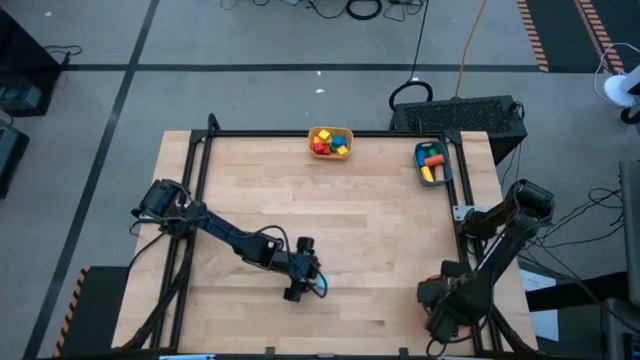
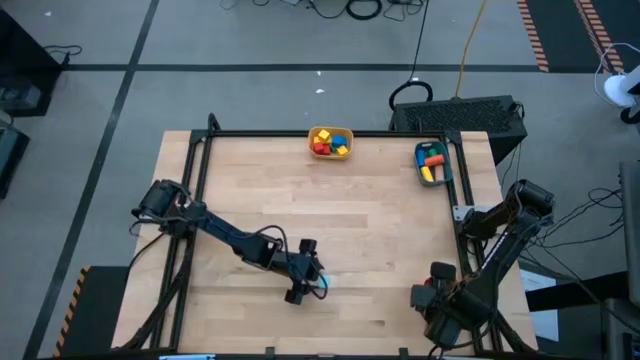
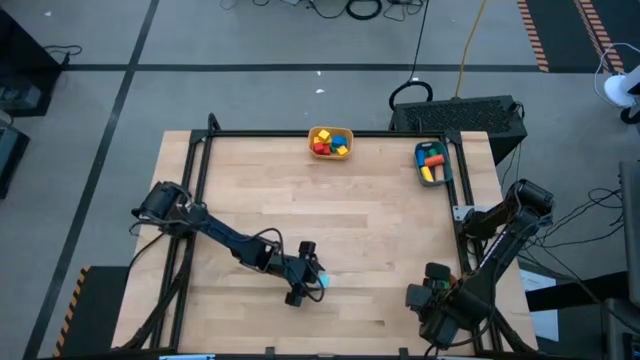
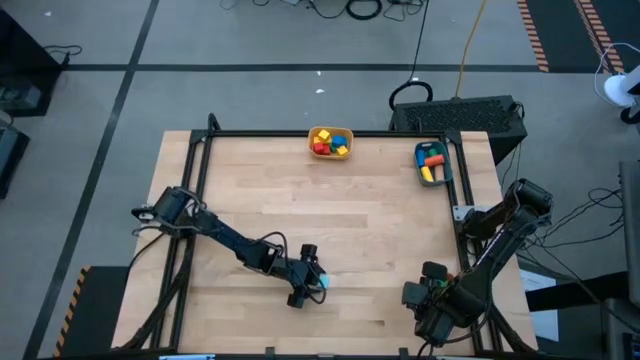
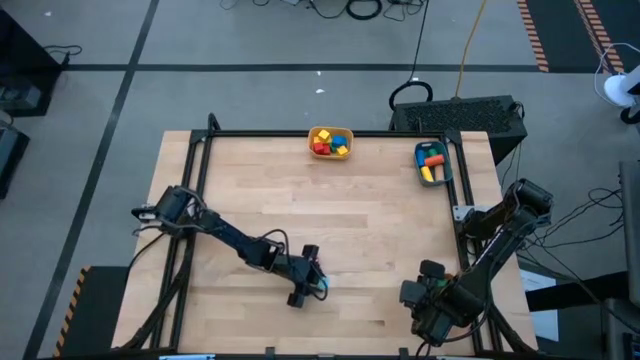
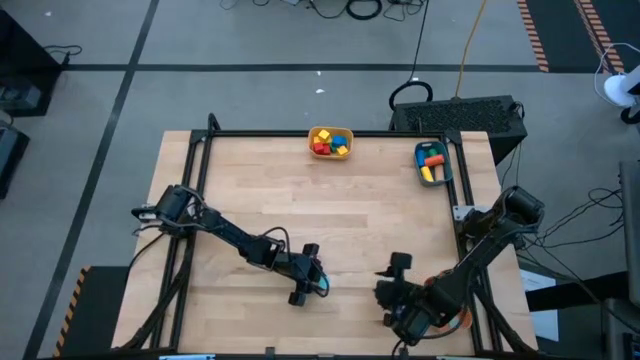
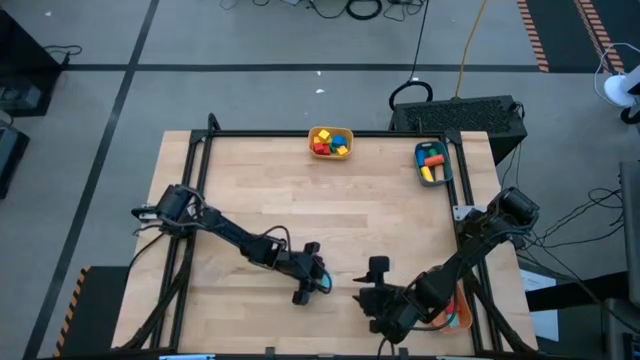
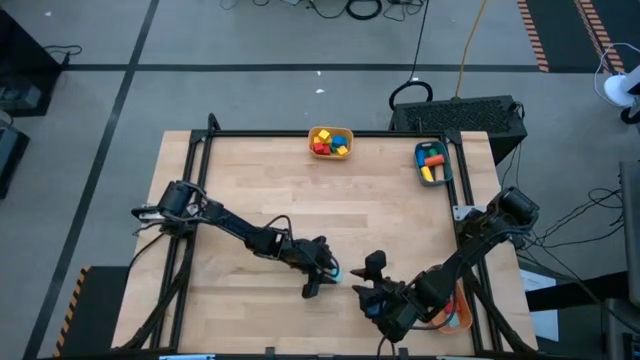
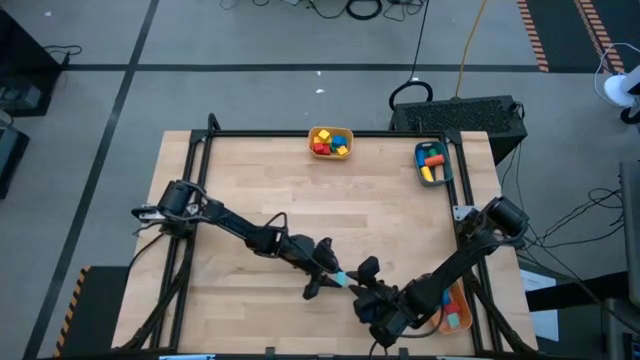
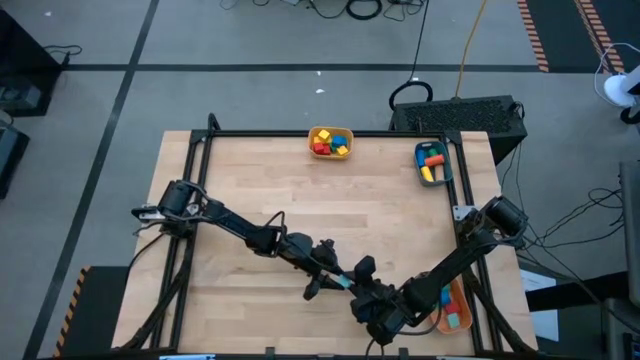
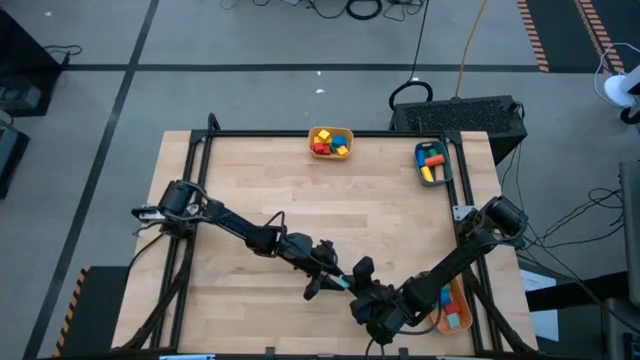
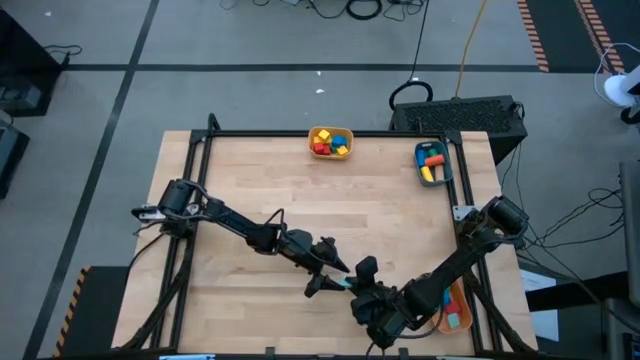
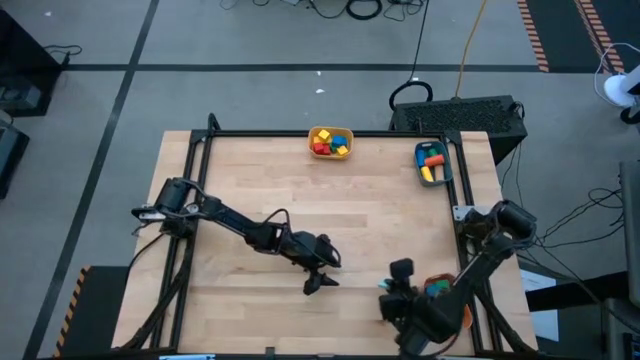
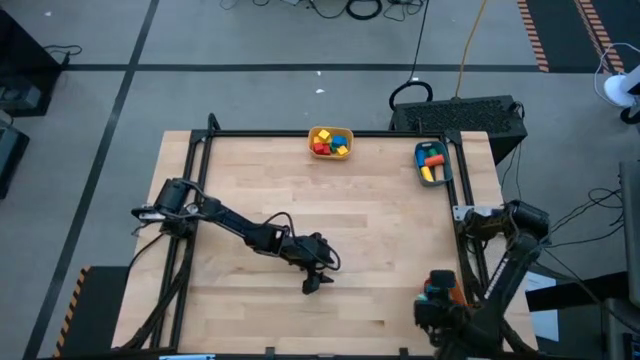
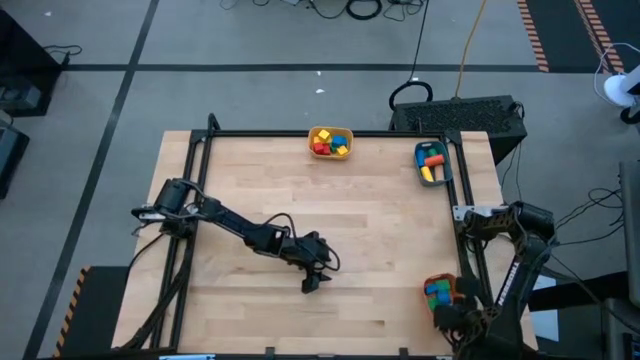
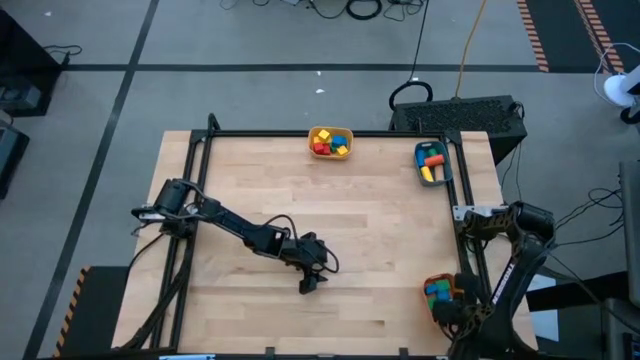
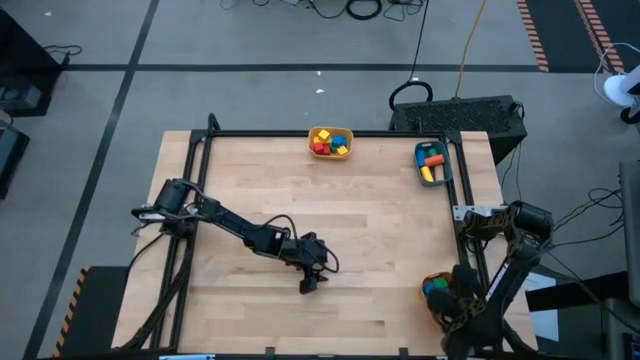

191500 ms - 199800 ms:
Task: Sort blocks by size
Put the light blue half circle blue block into the orange bin

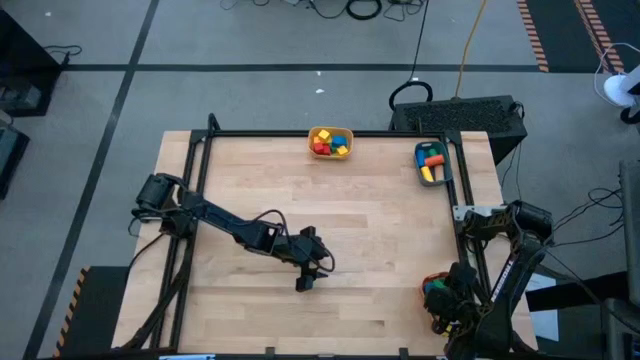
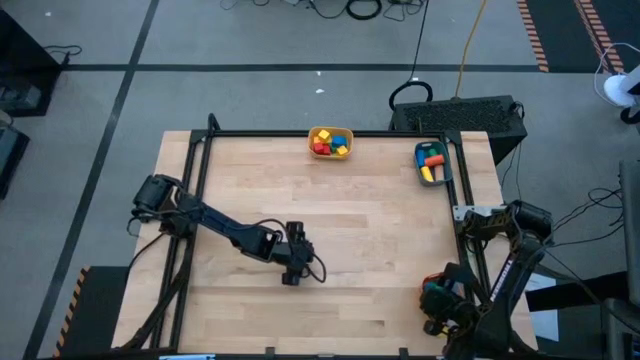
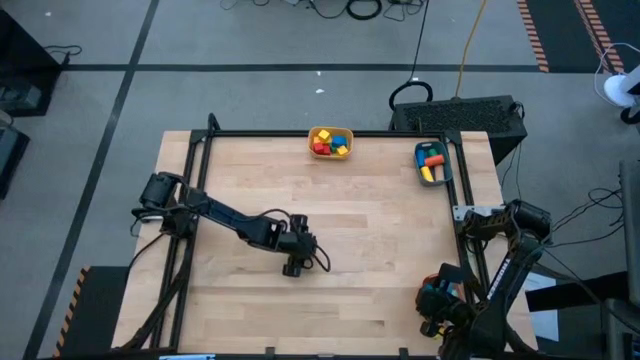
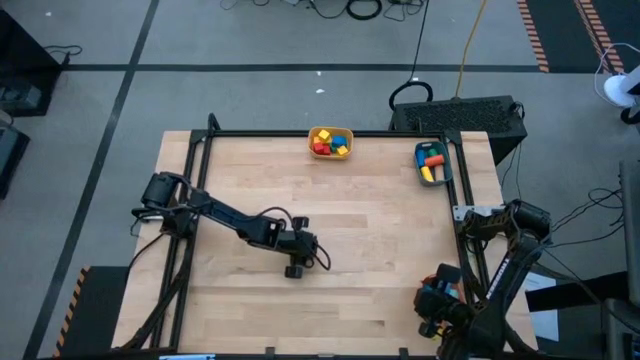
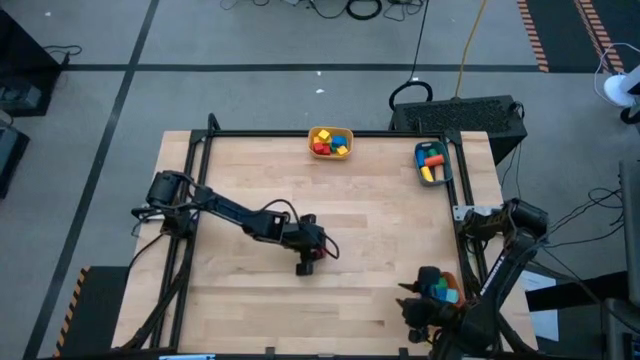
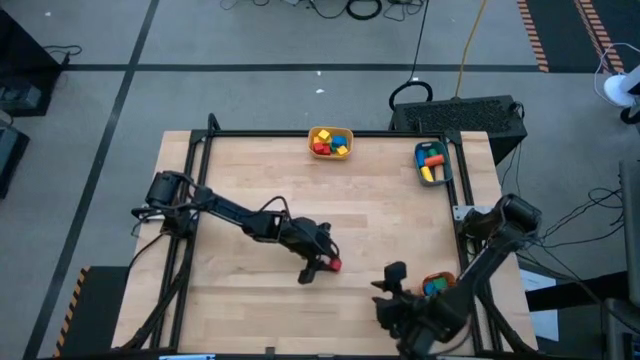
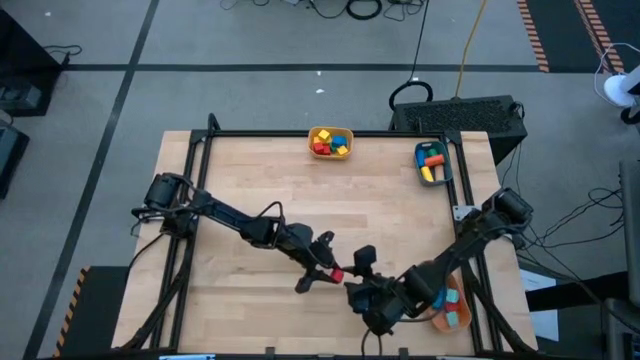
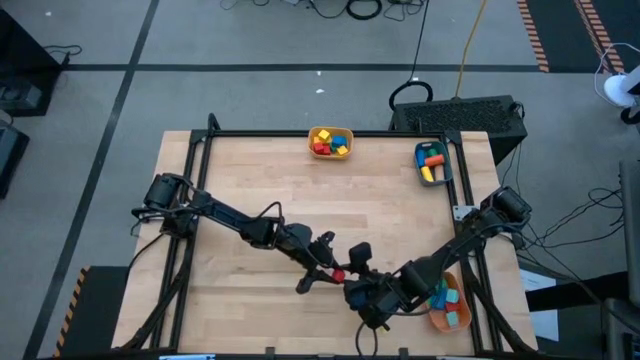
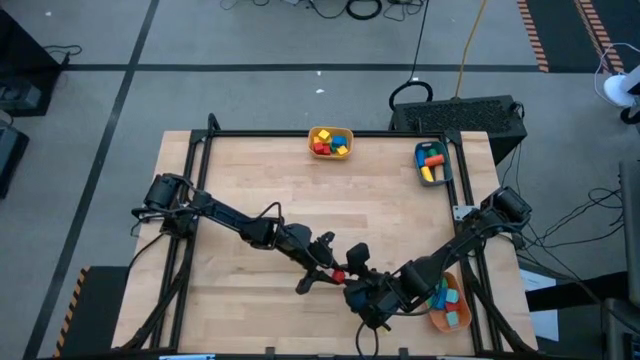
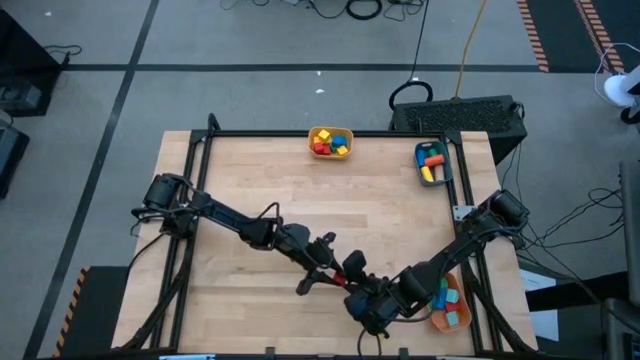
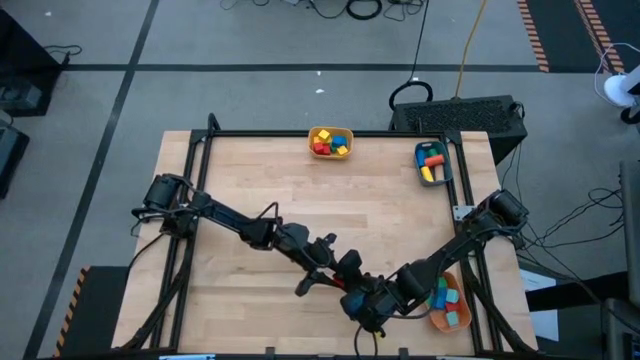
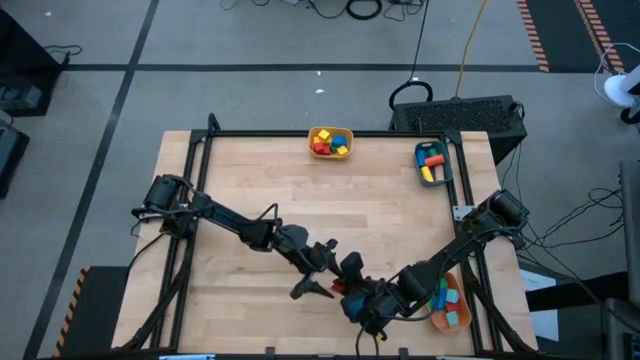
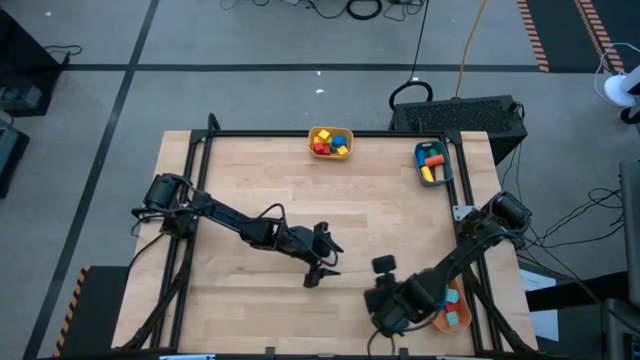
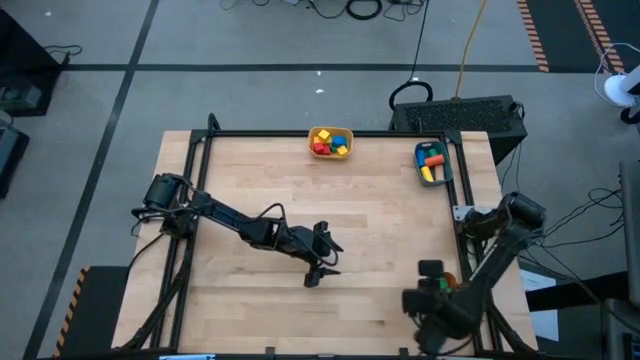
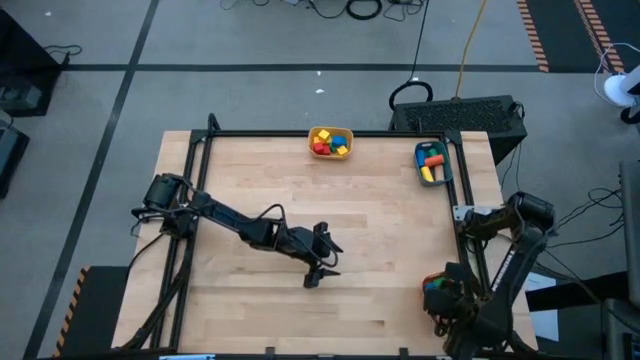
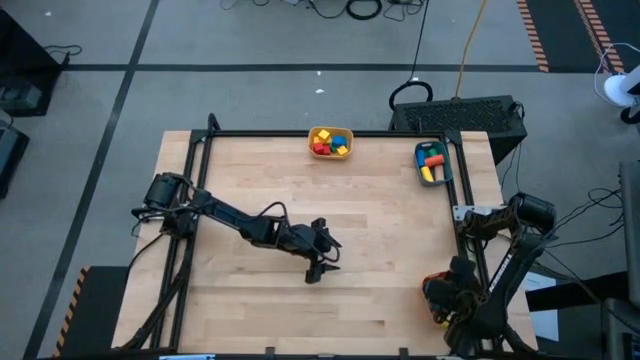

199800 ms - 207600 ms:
Put the red half circle block into the orange bin

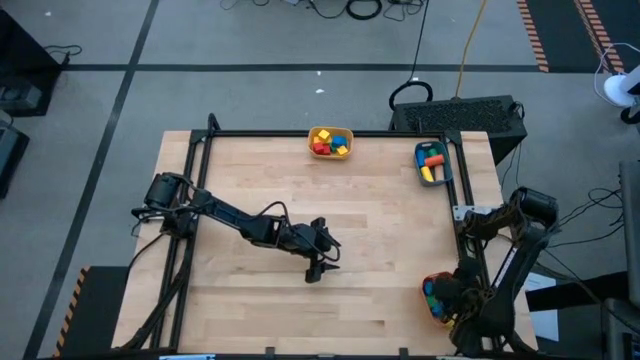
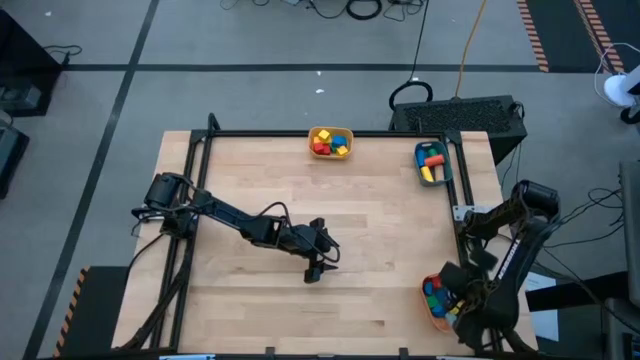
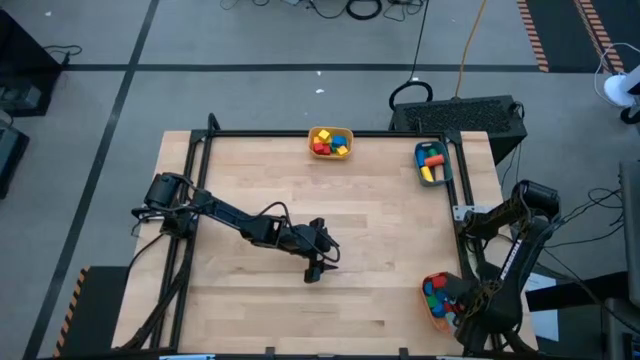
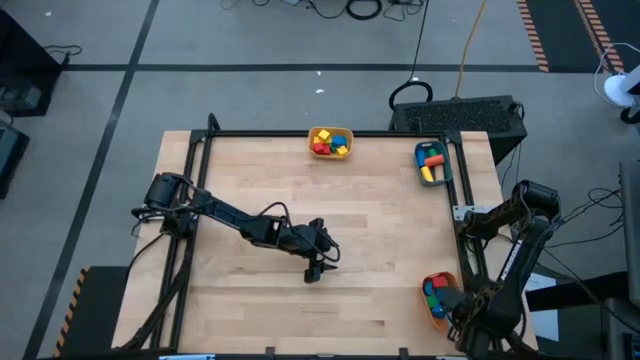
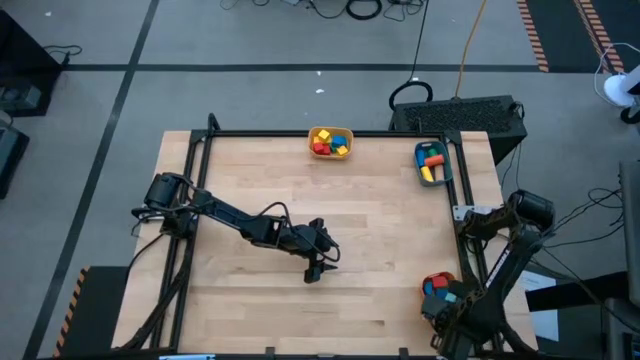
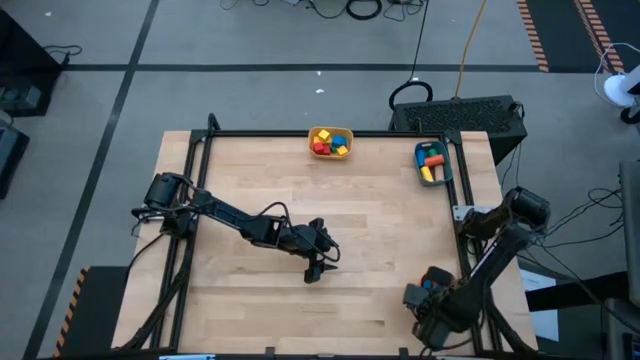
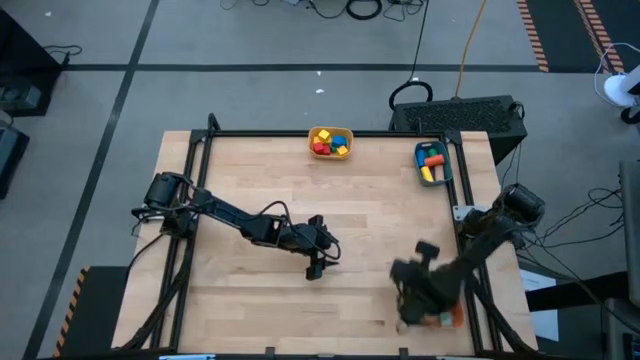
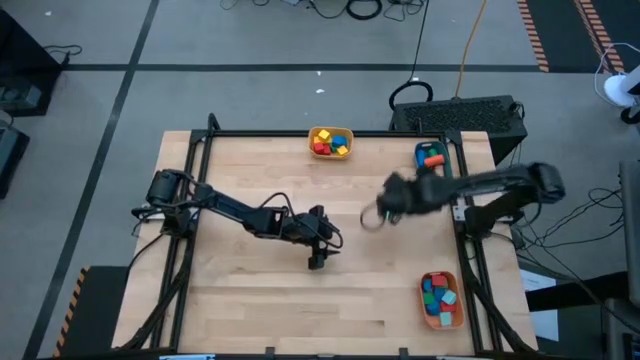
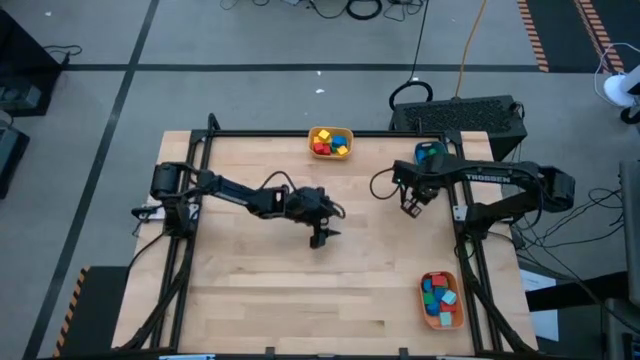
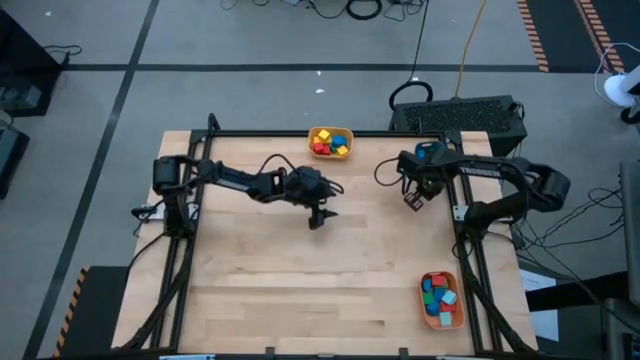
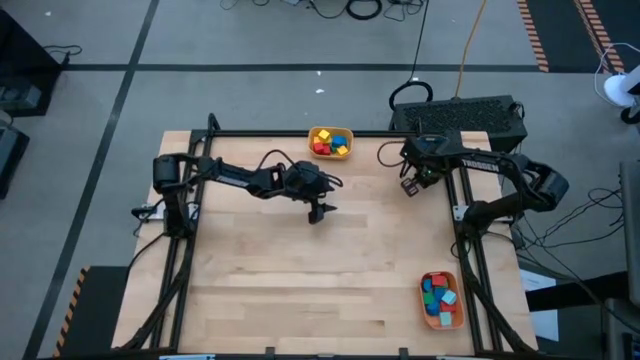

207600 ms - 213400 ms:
Adjust the bins
